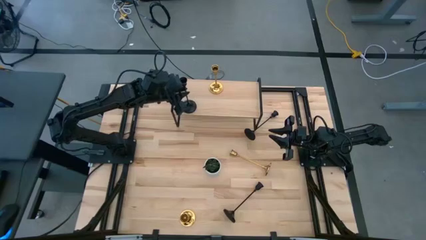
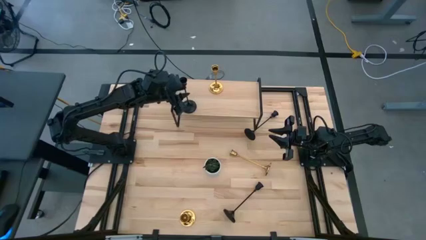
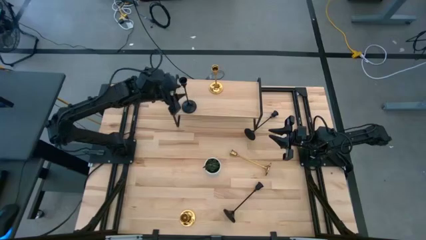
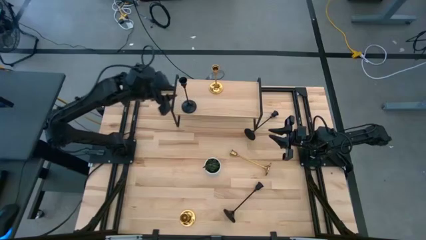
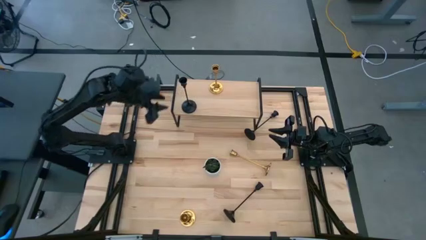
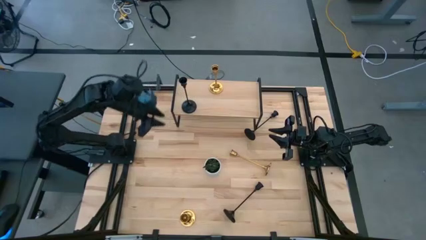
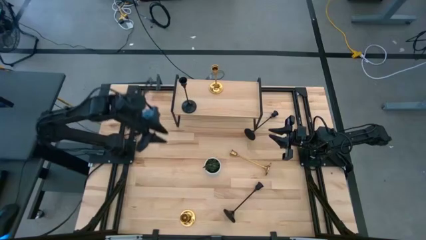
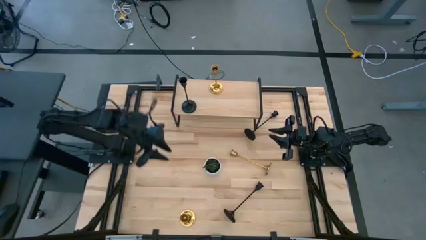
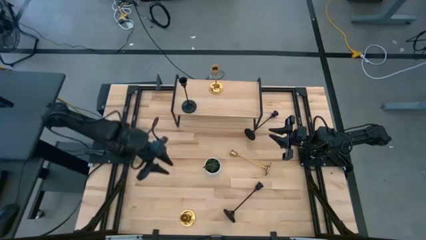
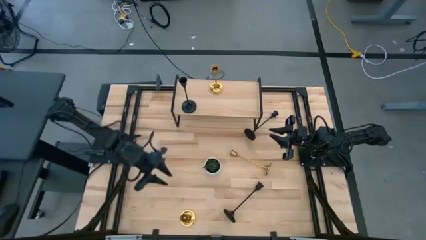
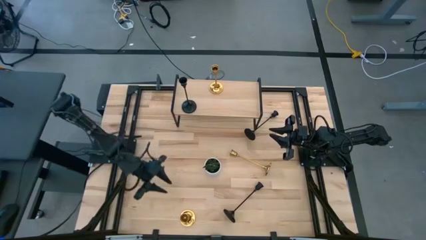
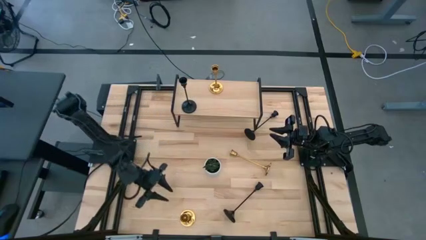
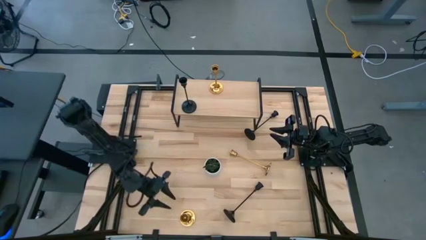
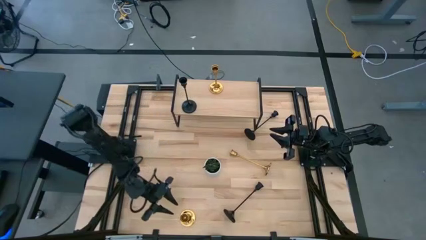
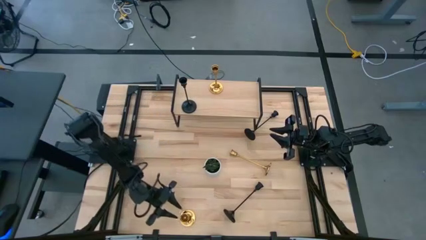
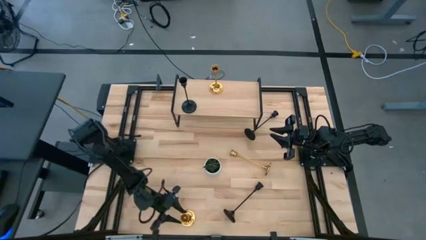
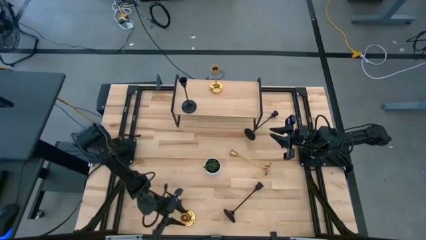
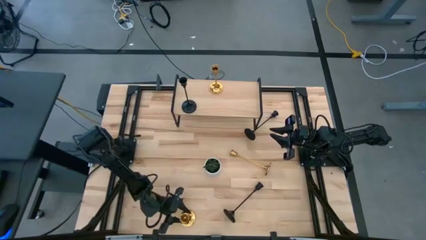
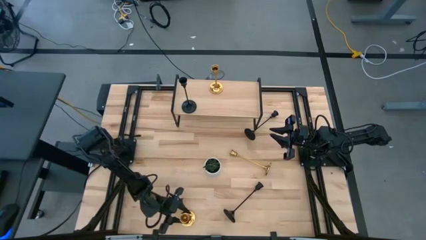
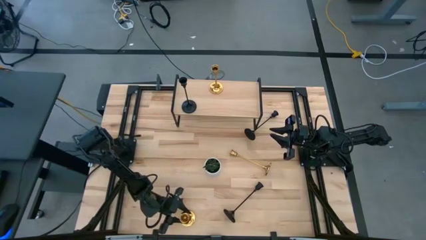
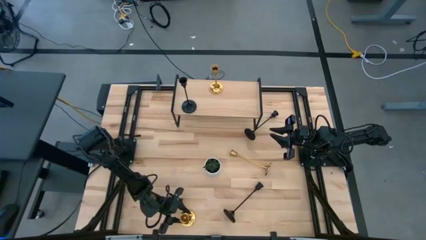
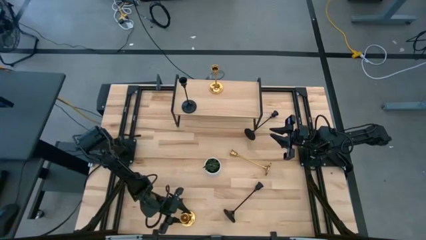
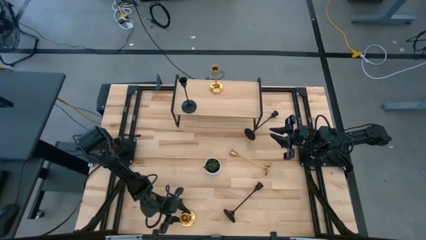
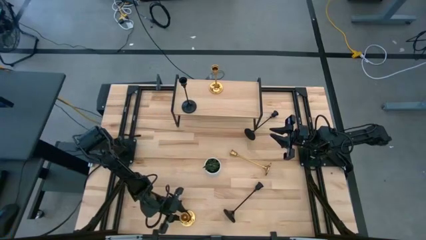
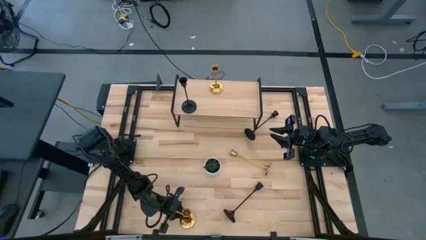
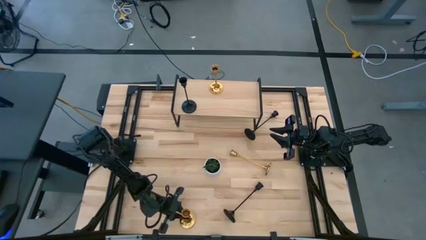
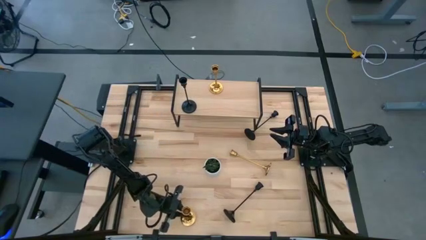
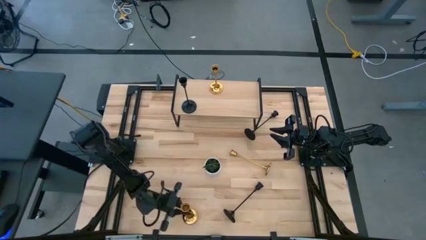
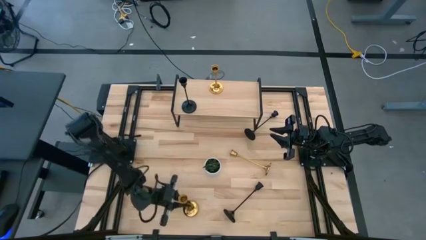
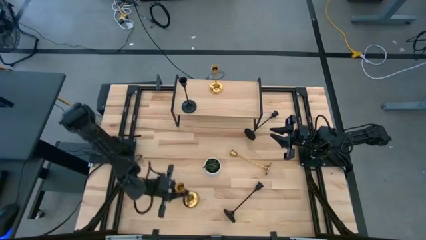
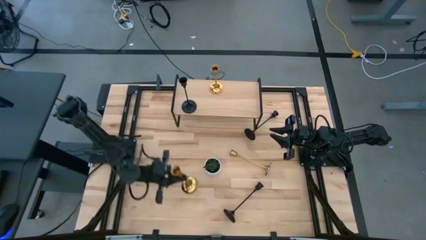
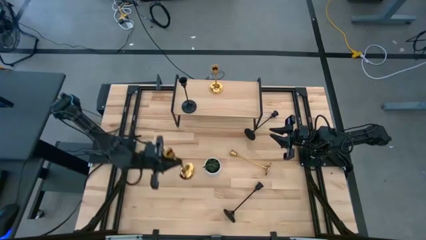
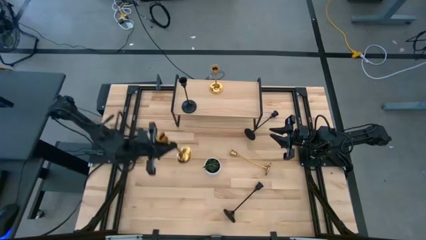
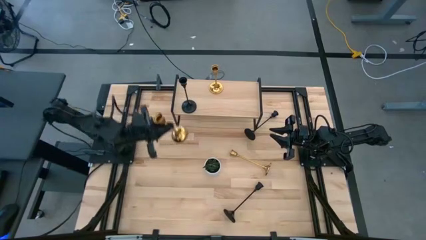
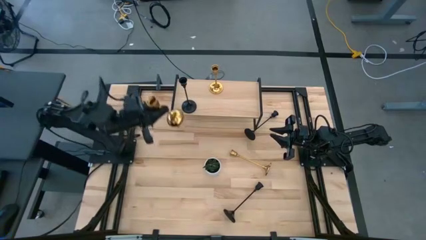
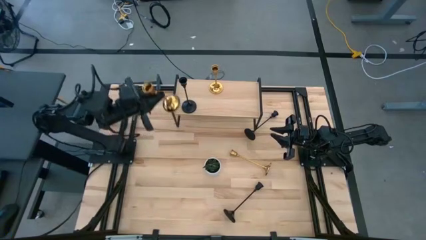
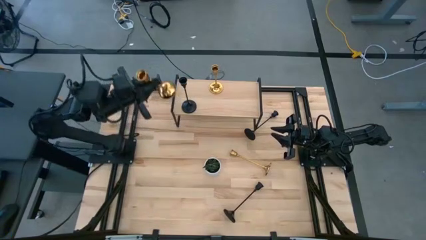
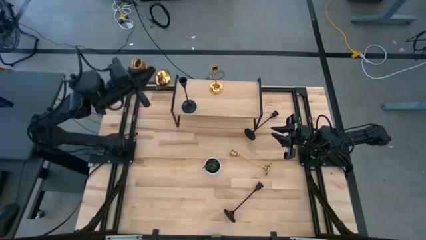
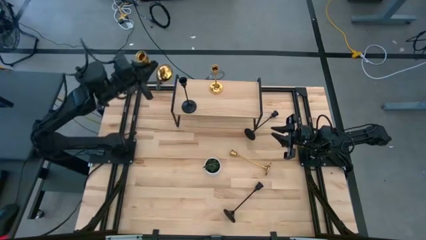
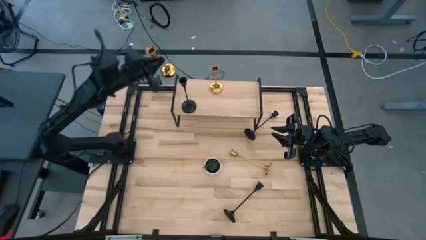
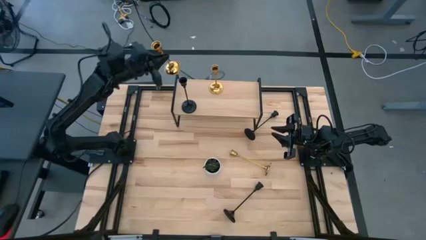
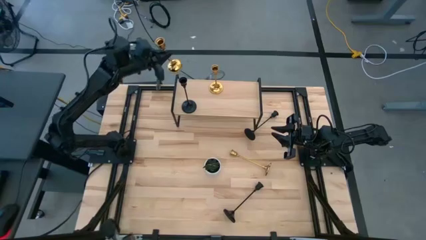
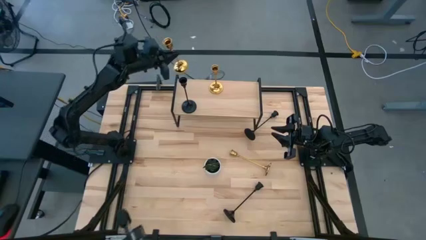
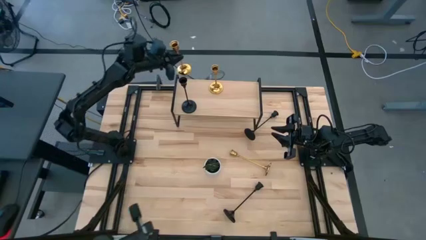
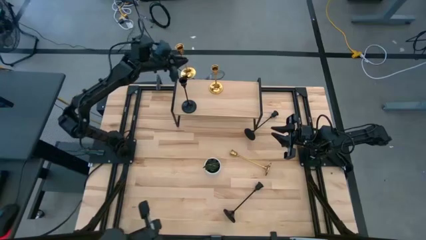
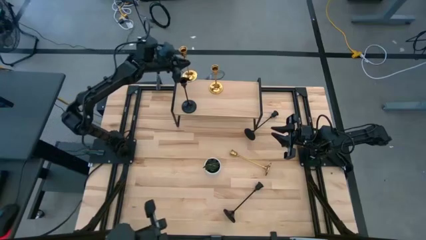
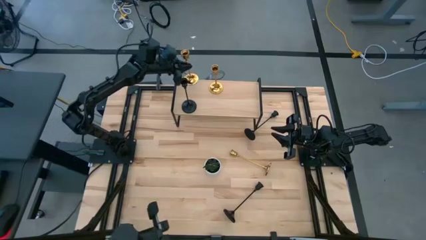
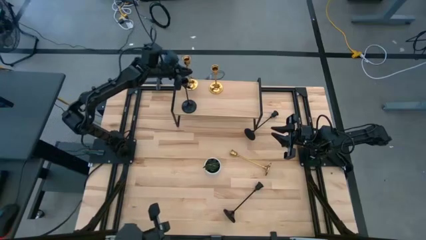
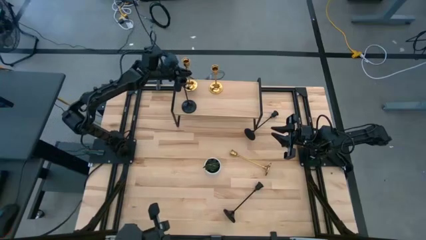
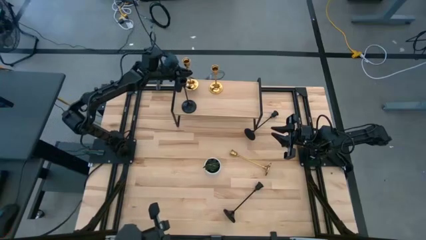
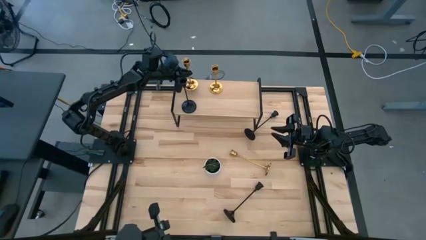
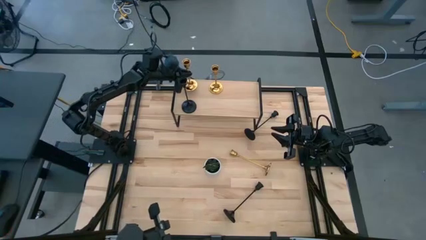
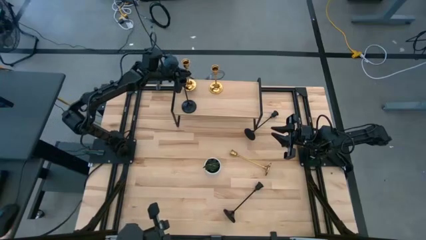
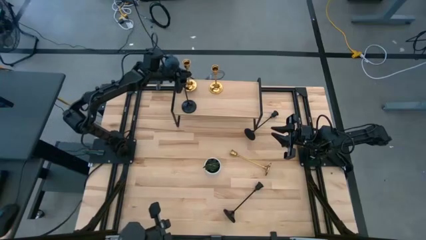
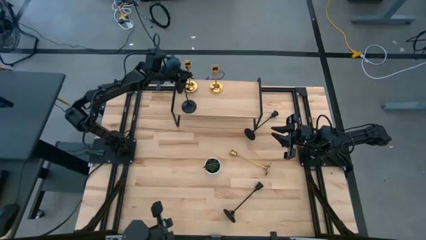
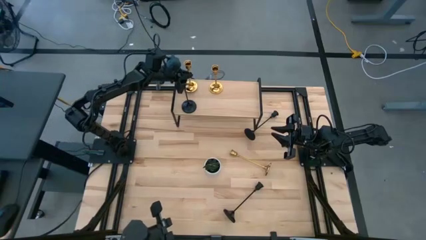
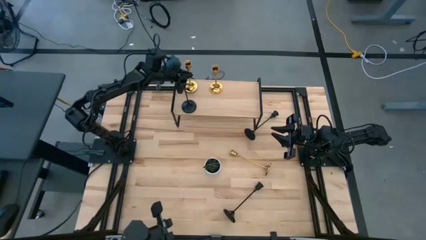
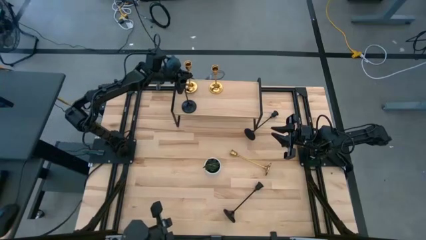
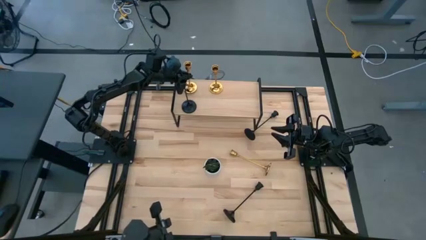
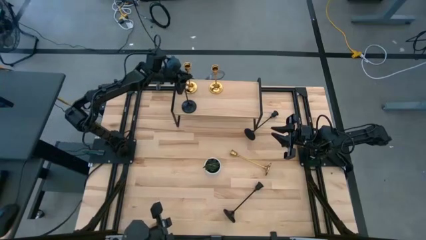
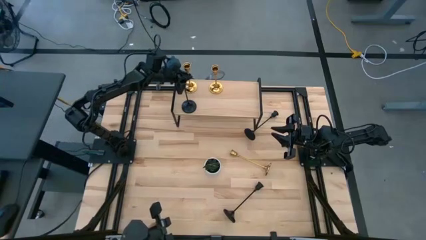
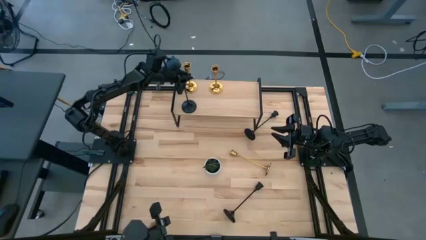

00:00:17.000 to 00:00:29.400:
Task: Pick & Place candle stick holders
Put the bottom gold candle holder on the shelf aligned with the other gold candle holder

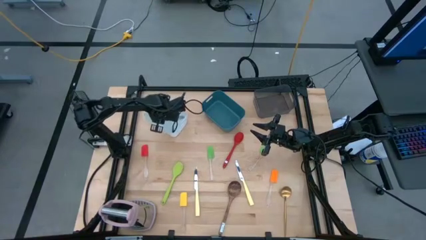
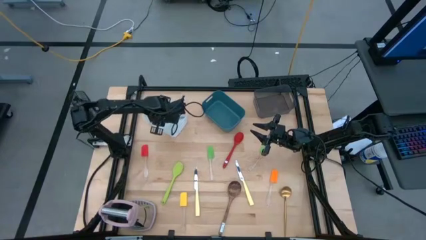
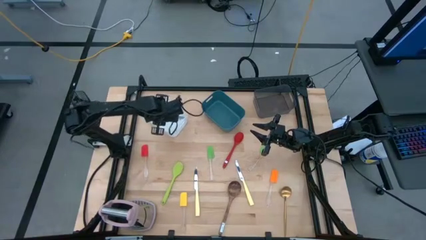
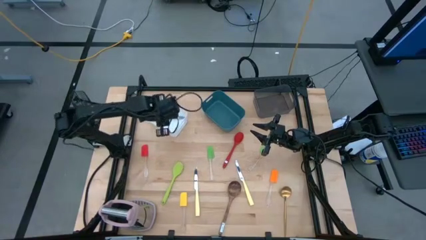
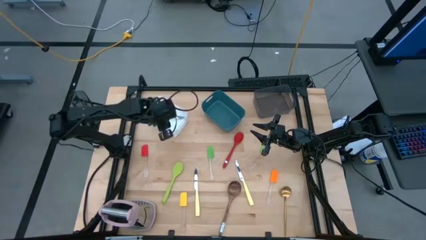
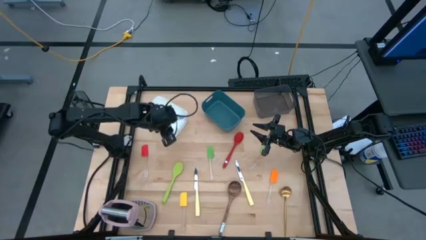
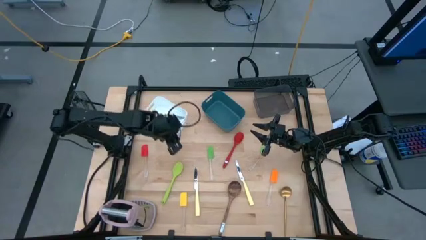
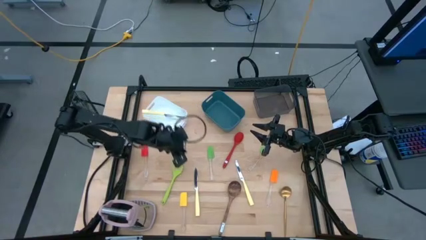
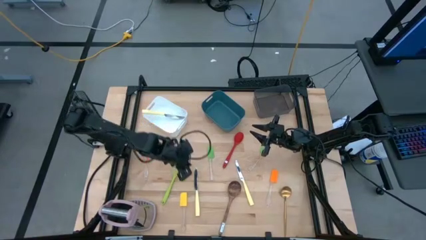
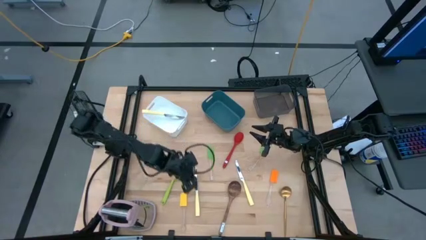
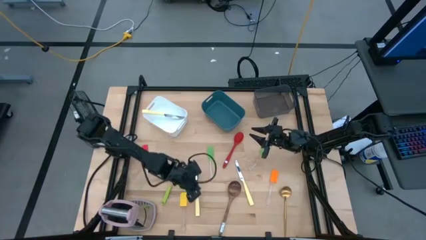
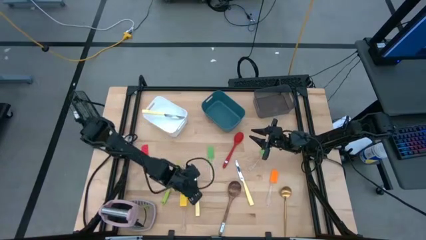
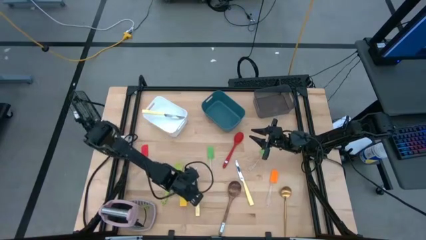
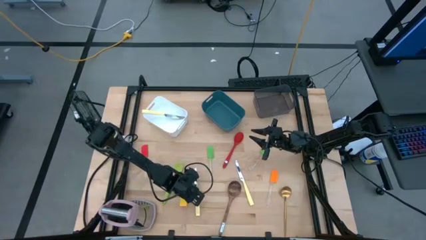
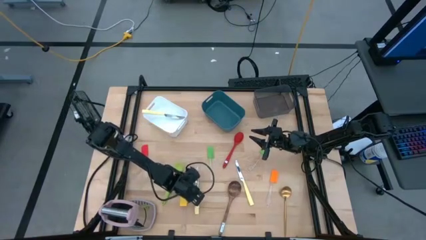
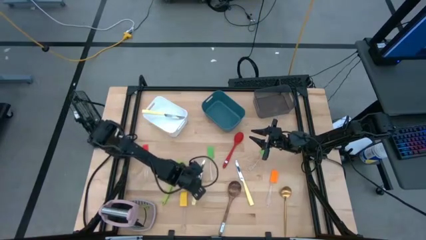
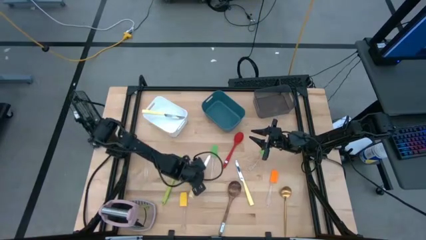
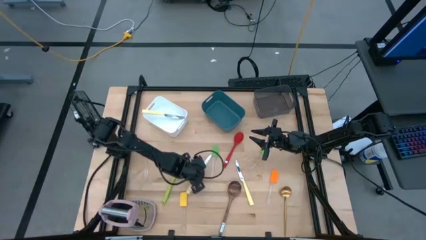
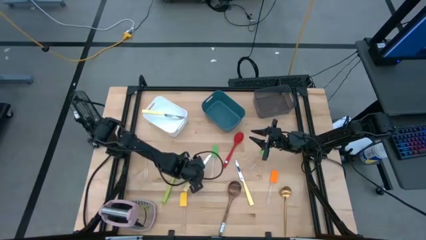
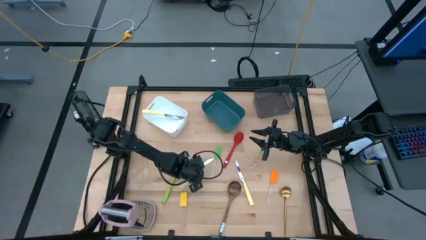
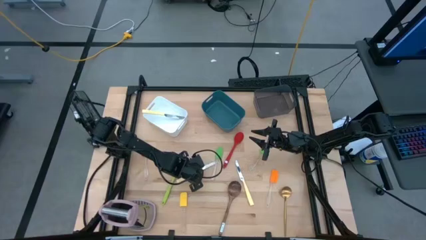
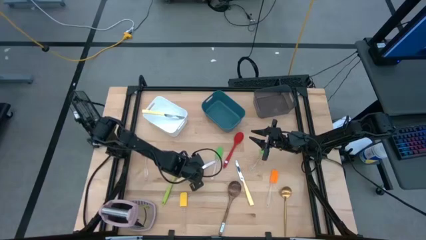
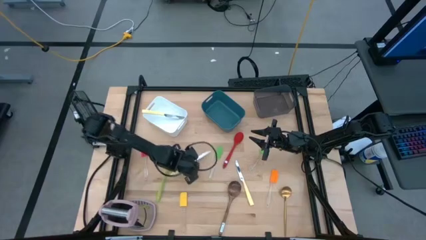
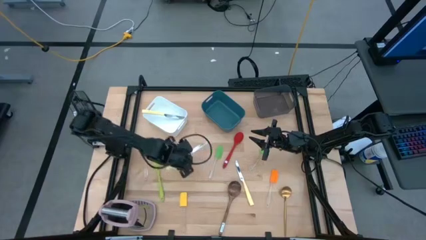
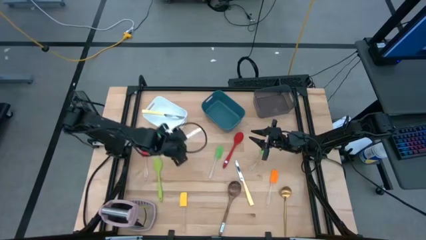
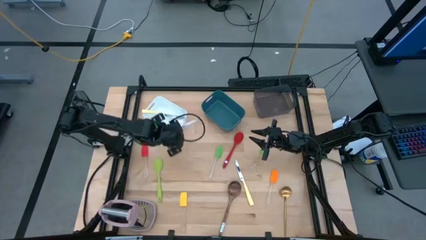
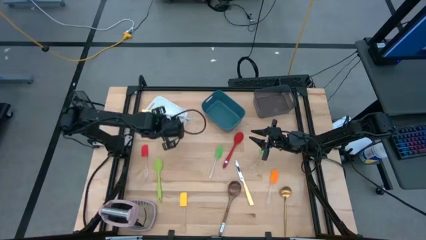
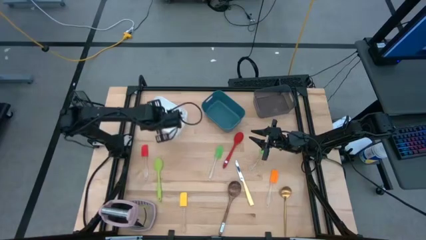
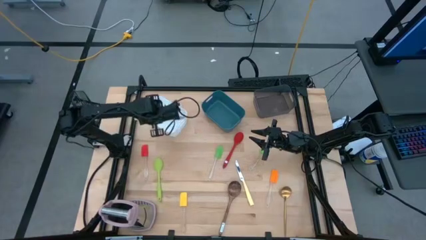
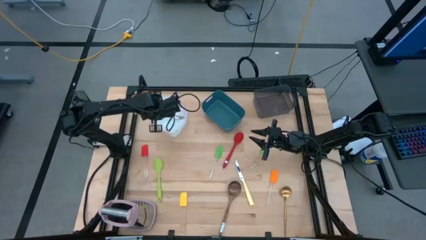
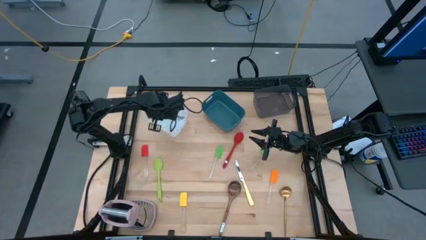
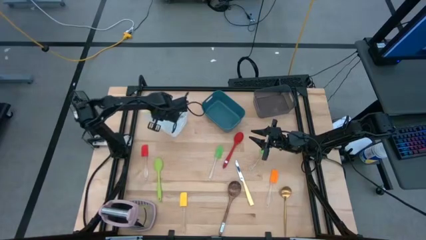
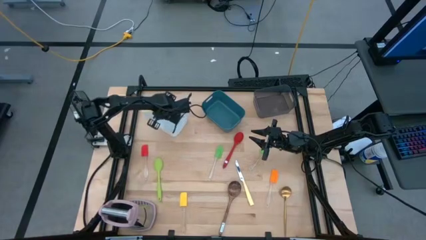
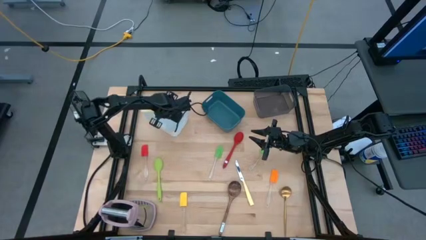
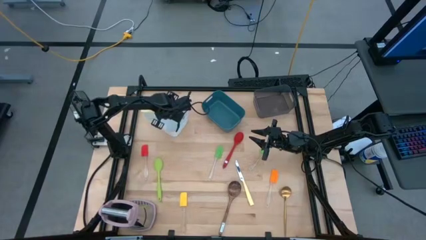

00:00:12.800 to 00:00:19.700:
Task: Pick & Place Kitchen Items
Put the left yellow knife into the white bin
